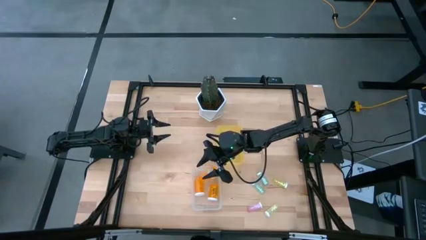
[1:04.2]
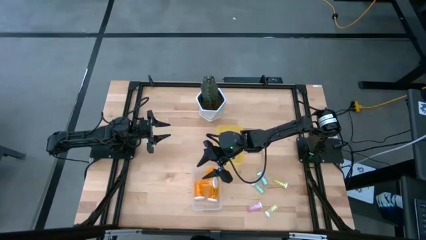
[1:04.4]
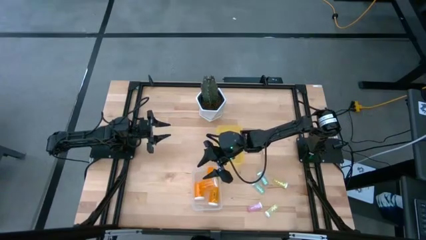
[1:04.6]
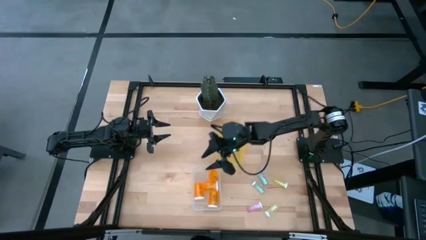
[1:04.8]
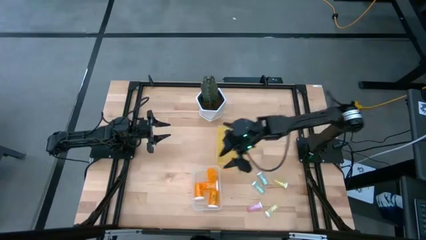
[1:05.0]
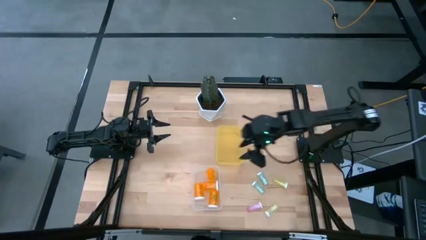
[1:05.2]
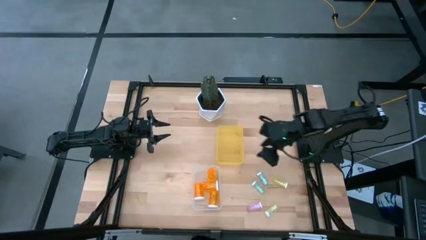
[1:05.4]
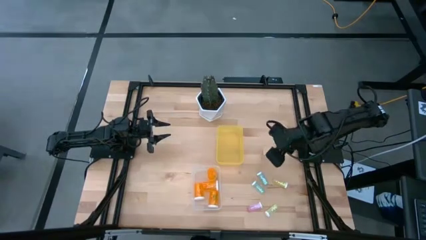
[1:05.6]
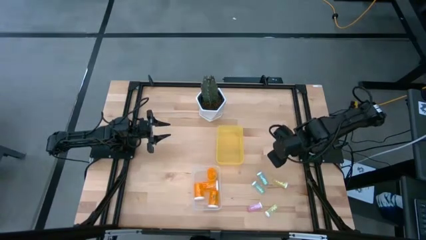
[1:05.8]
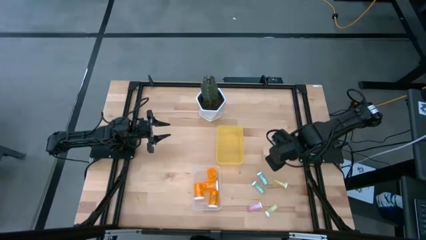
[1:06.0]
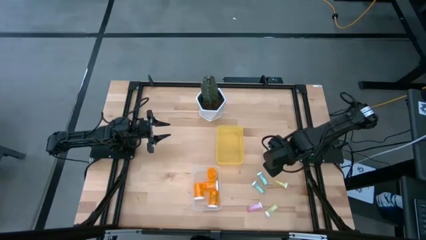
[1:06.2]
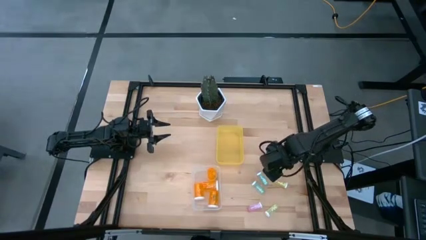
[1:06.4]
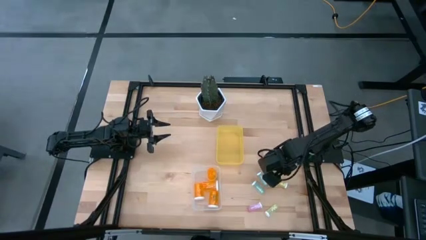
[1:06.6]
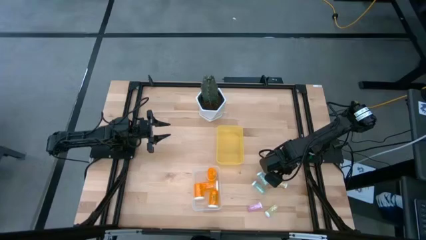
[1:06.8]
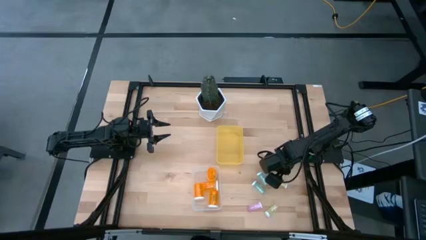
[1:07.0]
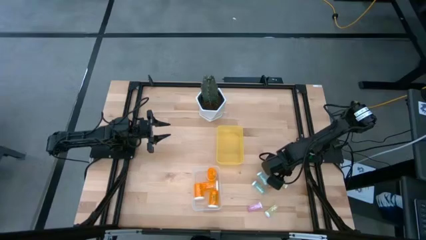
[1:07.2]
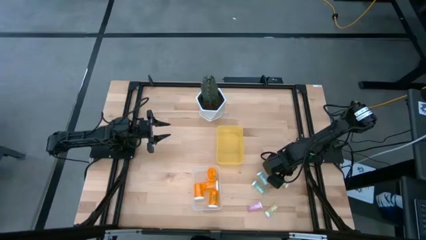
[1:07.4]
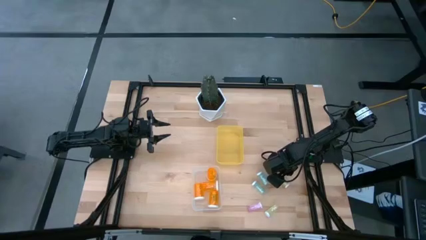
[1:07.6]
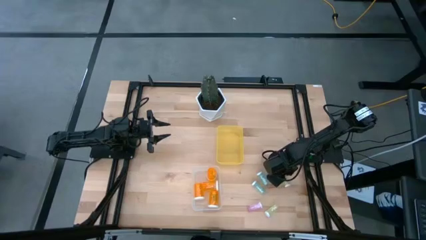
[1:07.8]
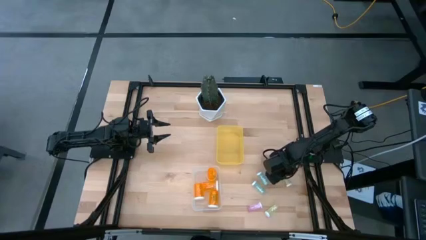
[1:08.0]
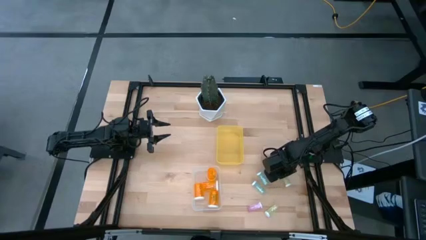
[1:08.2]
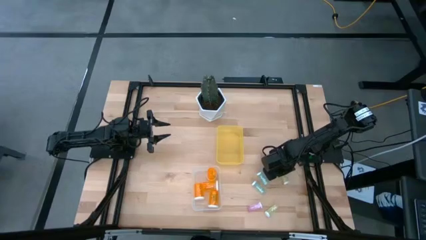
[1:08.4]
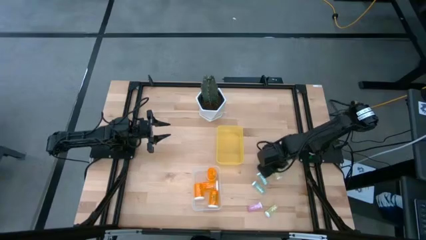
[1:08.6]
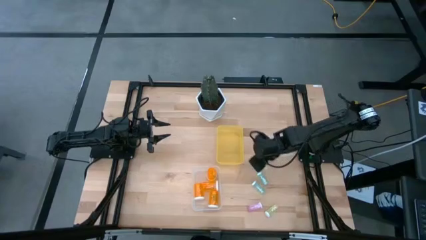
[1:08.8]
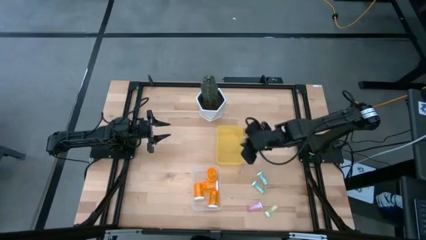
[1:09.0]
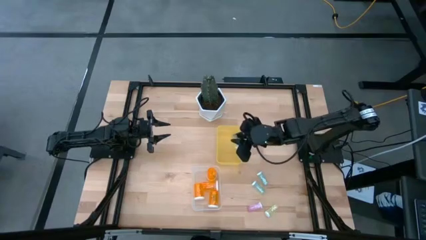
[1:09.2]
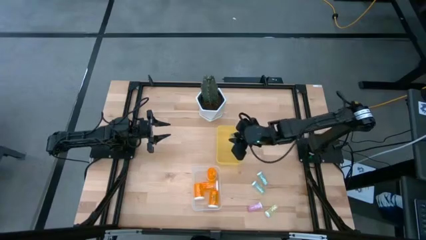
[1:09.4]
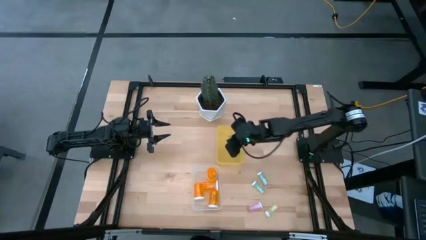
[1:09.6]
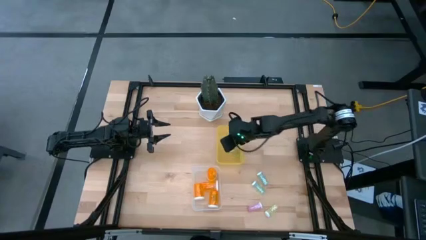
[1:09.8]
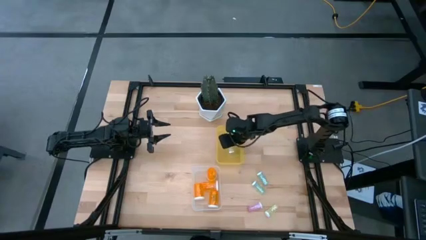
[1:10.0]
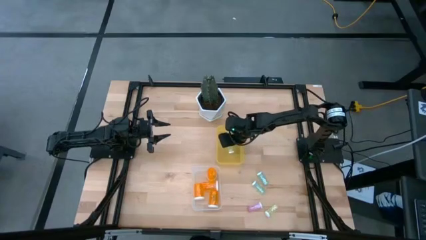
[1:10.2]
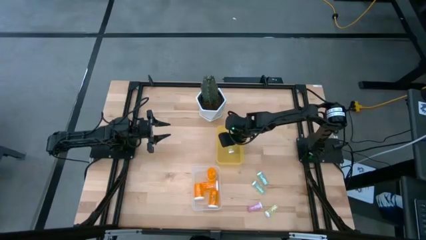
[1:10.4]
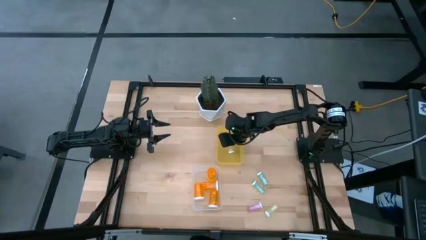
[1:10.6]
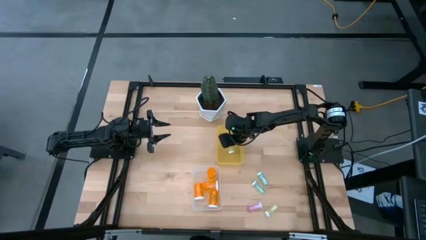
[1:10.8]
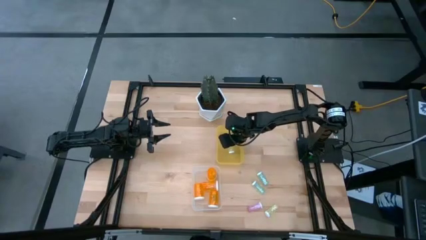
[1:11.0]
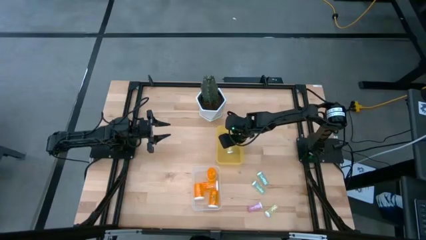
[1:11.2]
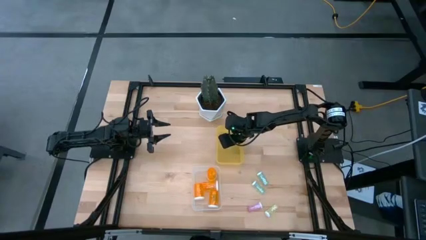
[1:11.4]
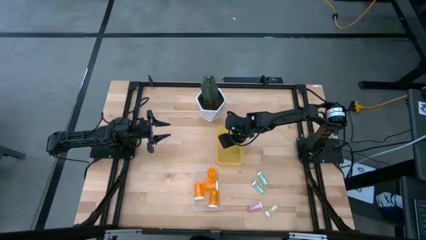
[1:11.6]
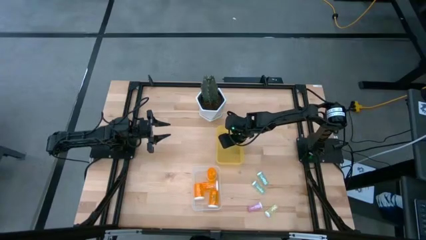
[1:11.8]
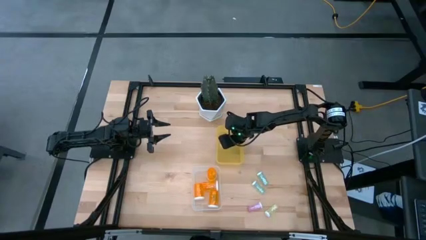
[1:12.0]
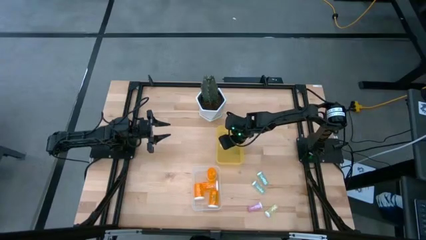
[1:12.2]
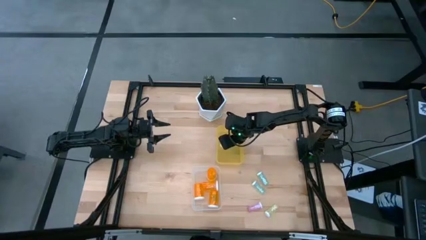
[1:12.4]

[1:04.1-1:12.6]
Task: Pick and place medicine bottles into bin by pill shape (circle, oval)
Put the small yellow pill bottle into the small yellow bin

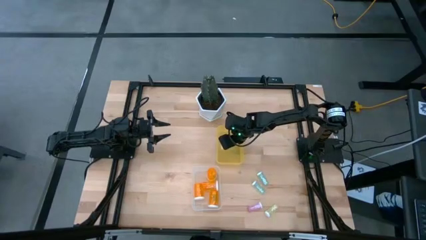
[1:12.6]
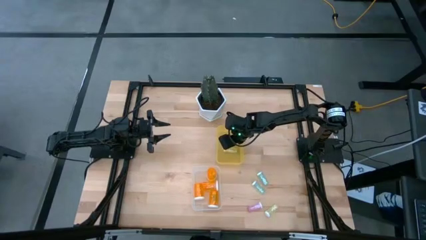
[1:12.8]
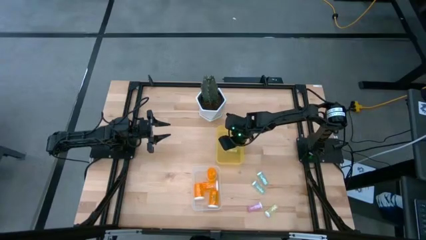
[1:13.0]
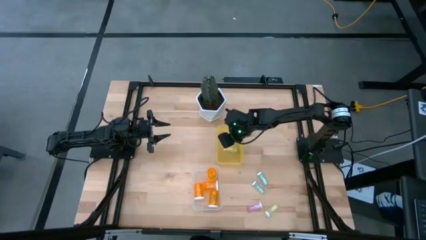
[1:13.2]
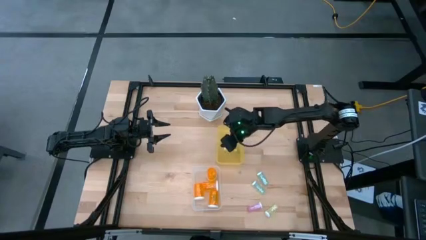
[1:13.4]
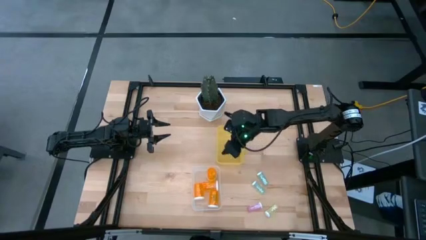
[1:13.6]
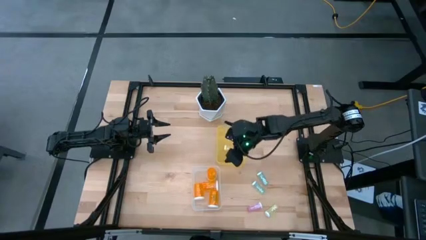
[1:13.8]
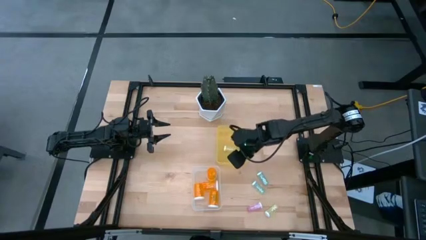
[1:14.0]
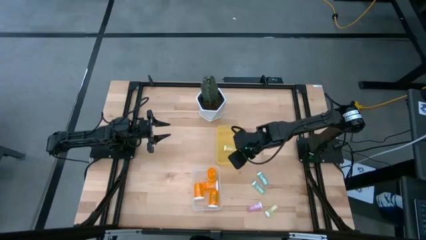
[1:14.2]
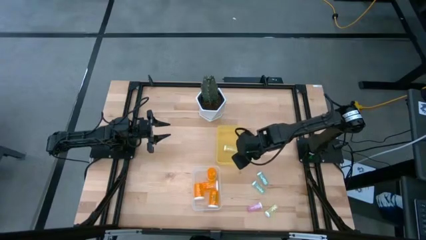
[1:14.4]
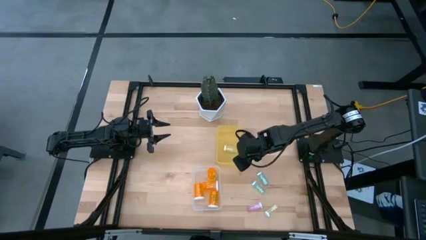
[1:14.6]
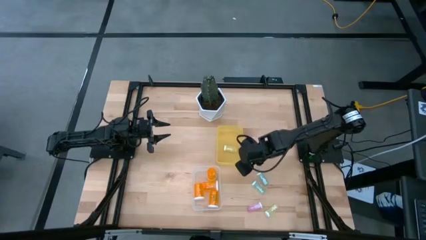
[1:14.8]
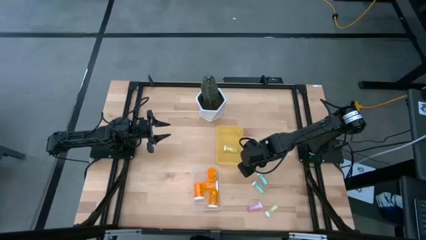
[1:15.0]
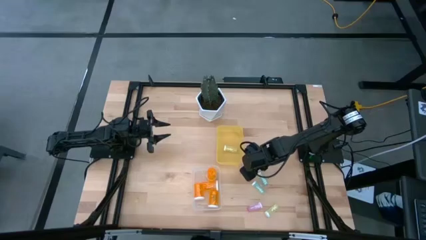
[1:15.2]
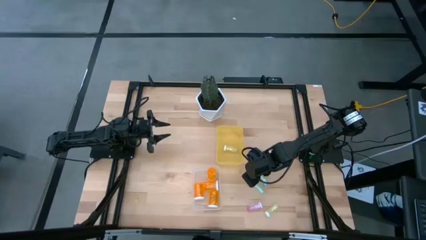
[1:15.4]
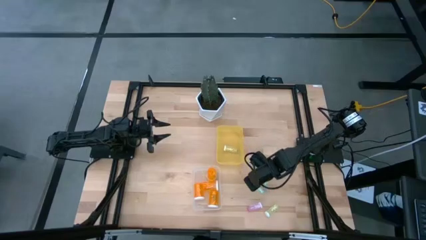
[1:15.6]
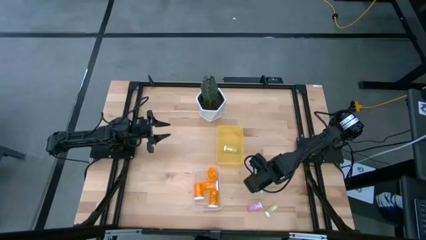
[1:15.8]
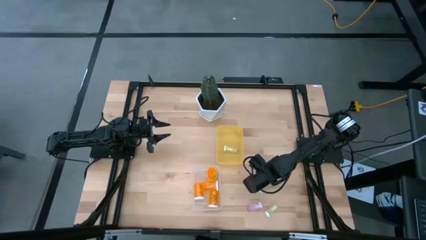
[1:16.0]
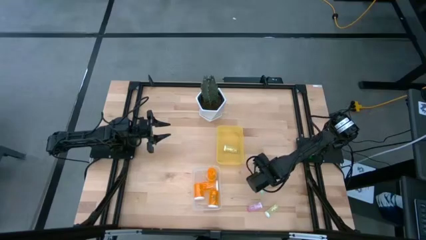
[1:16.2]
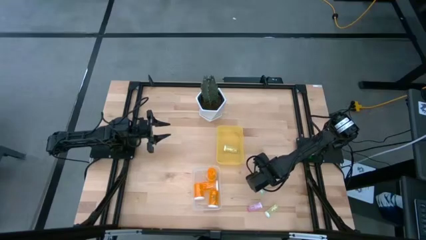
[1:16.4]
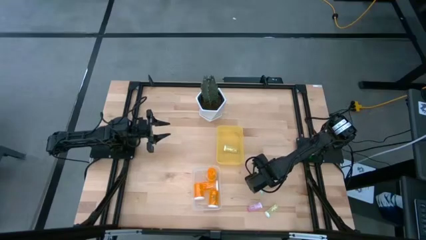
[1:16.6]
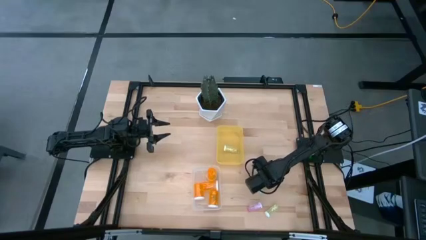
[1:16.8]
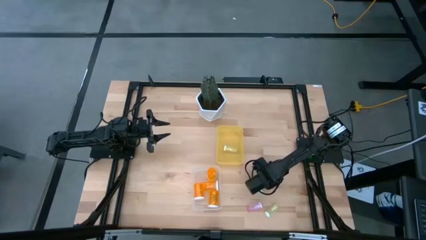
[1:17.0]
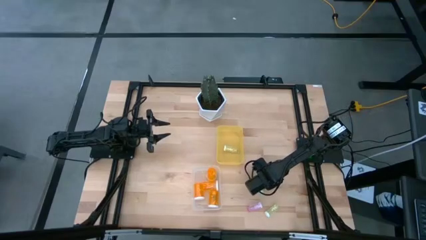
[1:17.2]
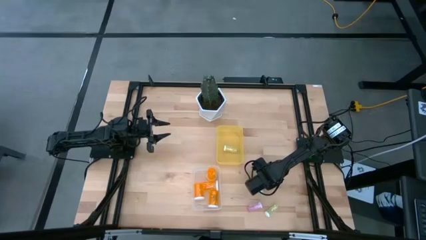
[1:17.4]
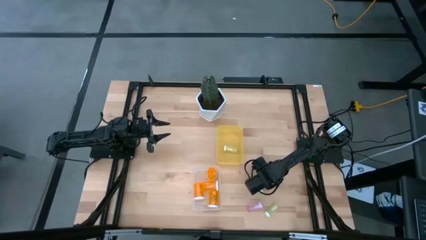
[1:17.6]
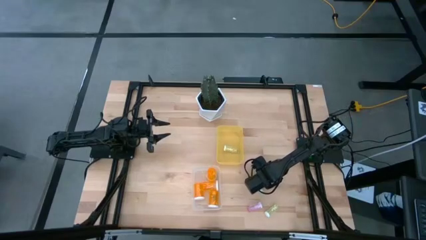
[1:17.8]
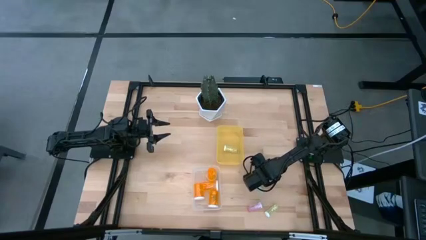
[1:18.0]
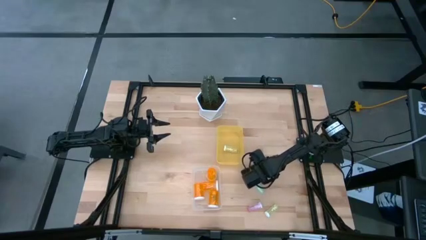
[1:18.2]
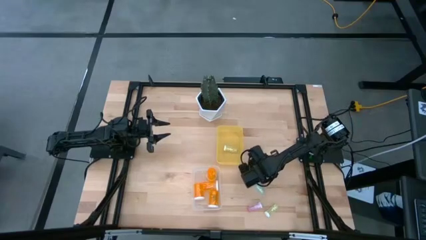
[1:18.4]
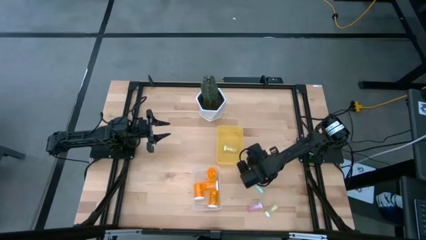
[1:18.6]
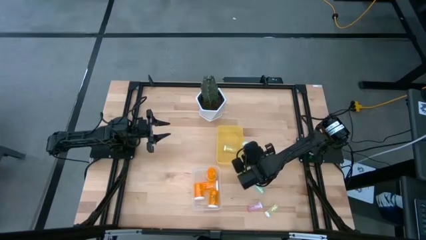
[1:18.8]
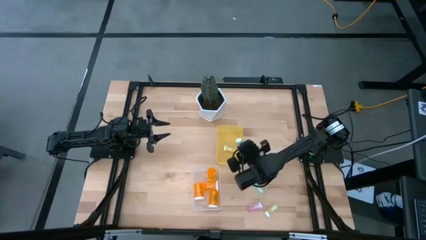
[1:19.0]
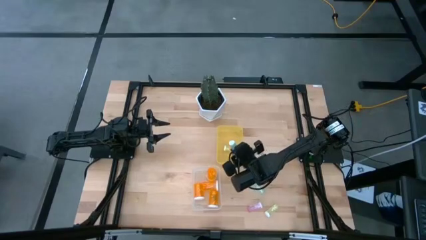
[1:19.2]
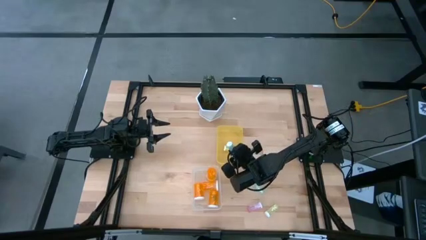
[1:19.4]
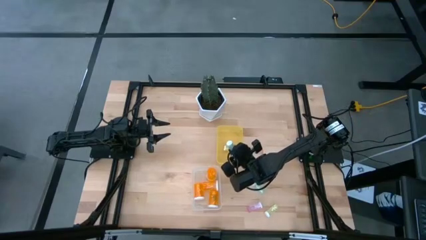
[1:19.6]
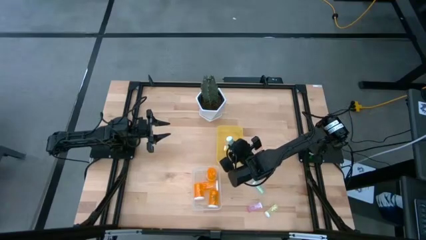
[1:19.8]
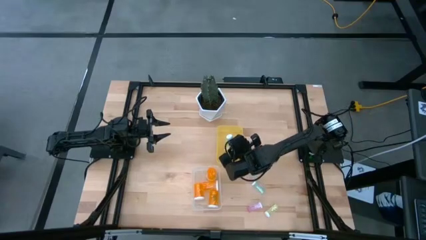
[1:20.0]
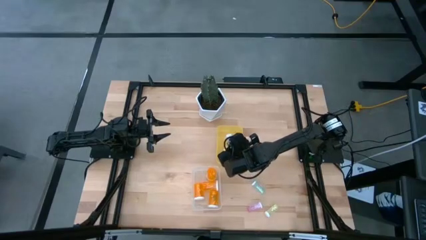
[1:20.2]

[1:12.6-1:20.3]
Put the small blue pill bottle into the small yellow bin
